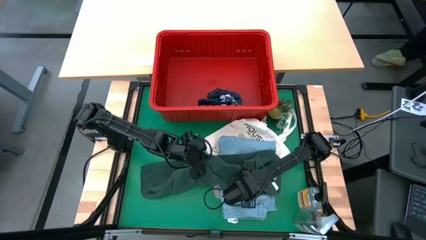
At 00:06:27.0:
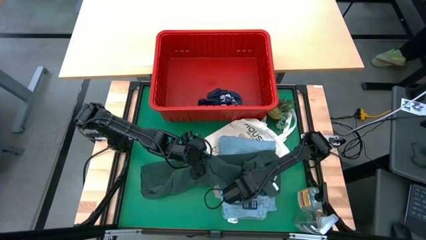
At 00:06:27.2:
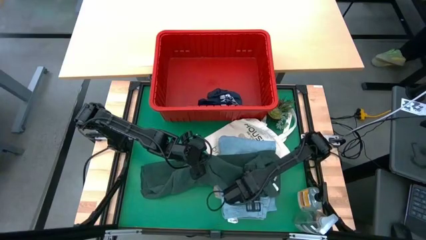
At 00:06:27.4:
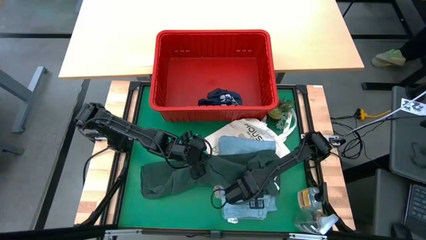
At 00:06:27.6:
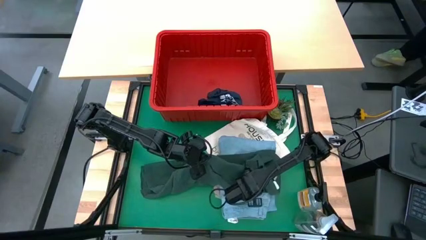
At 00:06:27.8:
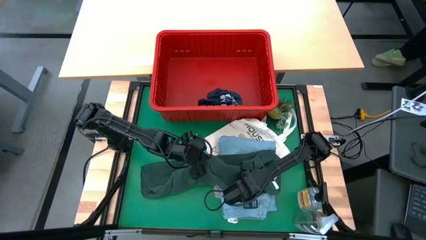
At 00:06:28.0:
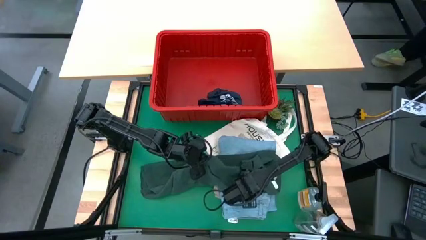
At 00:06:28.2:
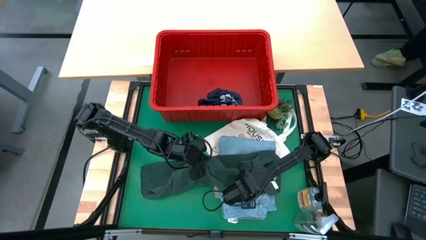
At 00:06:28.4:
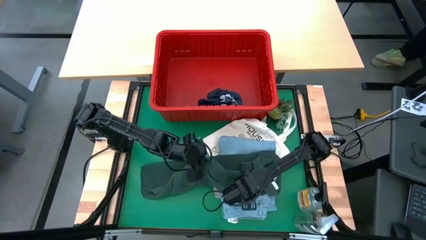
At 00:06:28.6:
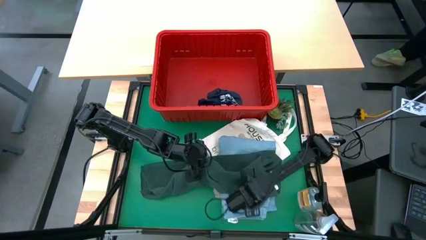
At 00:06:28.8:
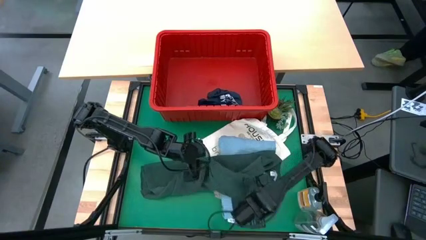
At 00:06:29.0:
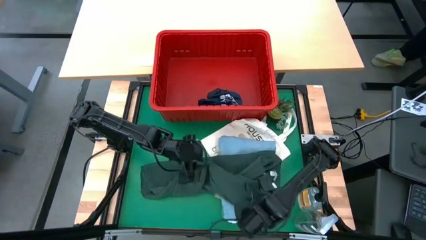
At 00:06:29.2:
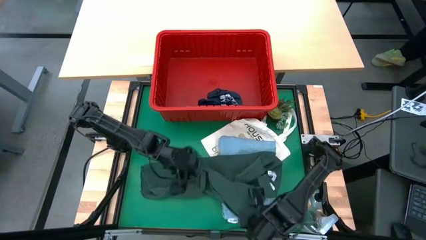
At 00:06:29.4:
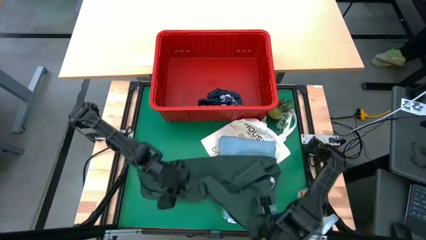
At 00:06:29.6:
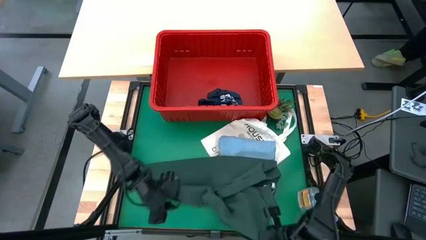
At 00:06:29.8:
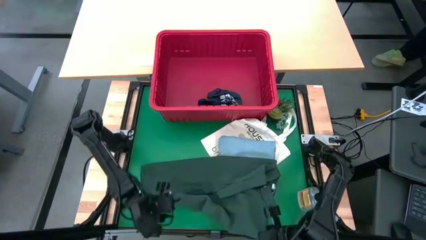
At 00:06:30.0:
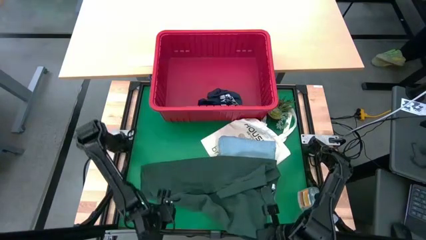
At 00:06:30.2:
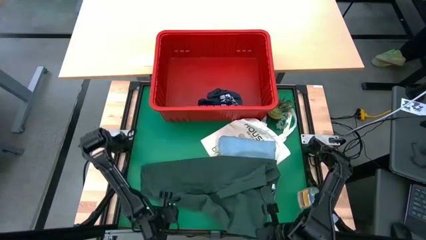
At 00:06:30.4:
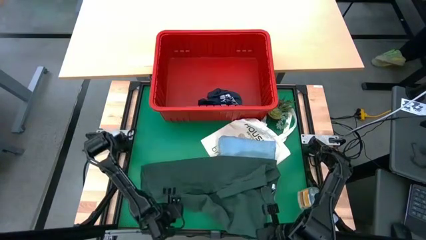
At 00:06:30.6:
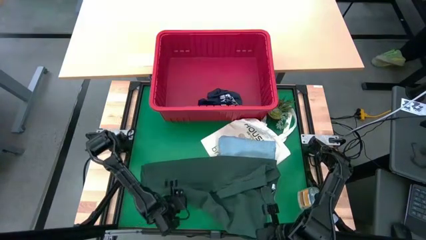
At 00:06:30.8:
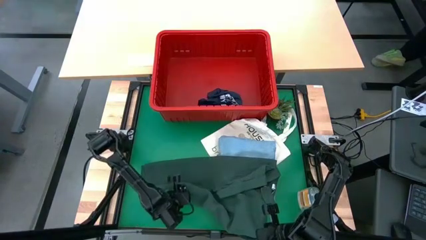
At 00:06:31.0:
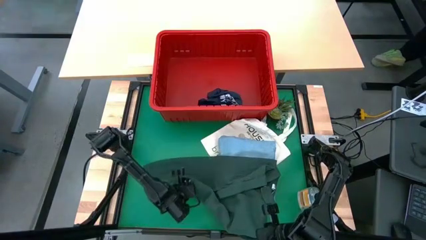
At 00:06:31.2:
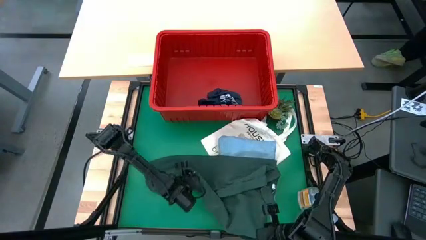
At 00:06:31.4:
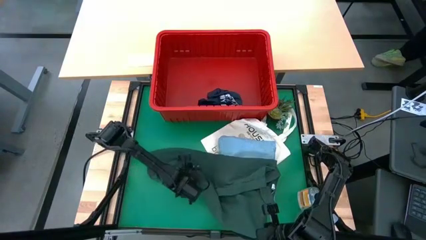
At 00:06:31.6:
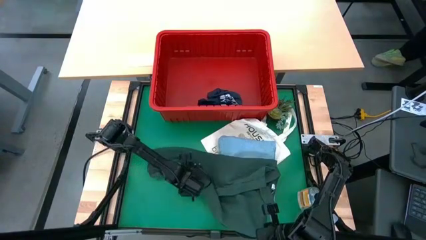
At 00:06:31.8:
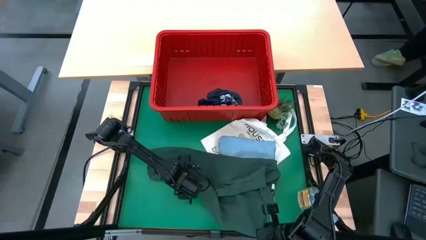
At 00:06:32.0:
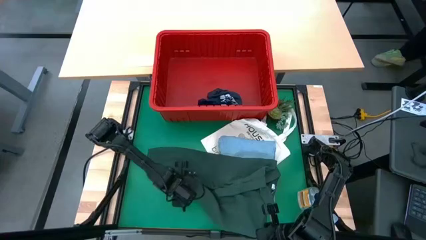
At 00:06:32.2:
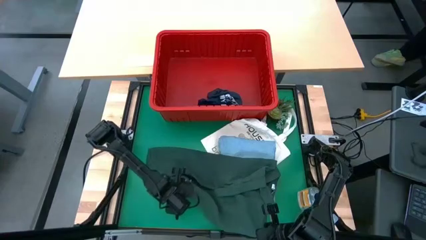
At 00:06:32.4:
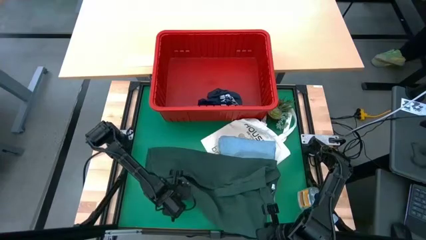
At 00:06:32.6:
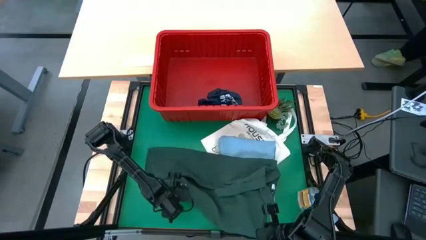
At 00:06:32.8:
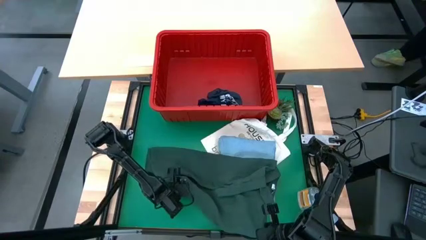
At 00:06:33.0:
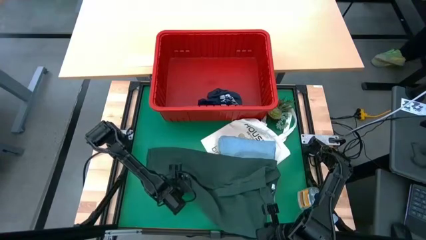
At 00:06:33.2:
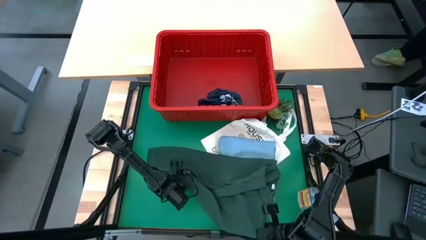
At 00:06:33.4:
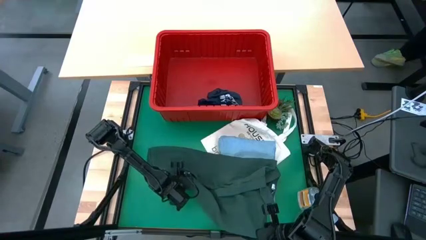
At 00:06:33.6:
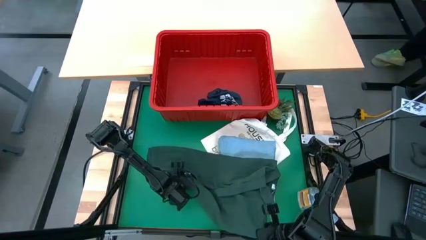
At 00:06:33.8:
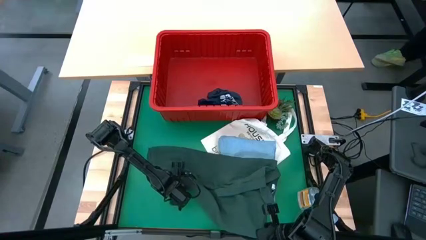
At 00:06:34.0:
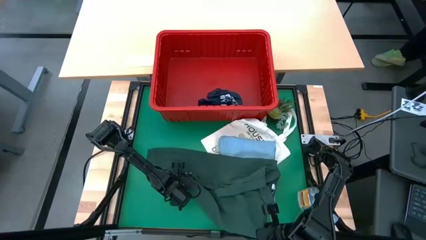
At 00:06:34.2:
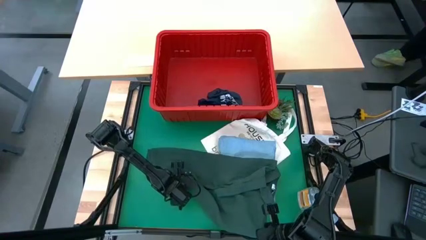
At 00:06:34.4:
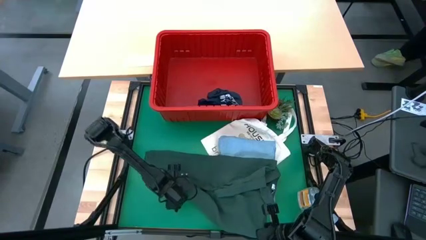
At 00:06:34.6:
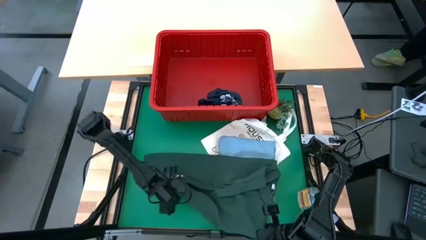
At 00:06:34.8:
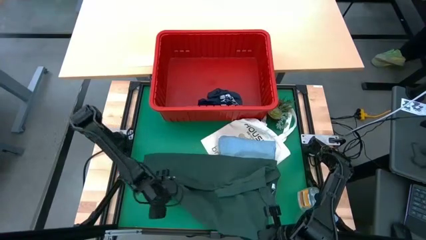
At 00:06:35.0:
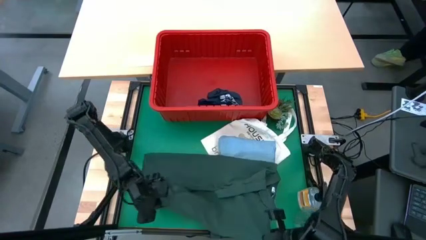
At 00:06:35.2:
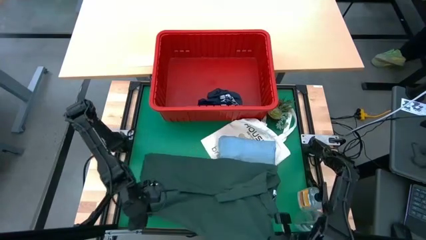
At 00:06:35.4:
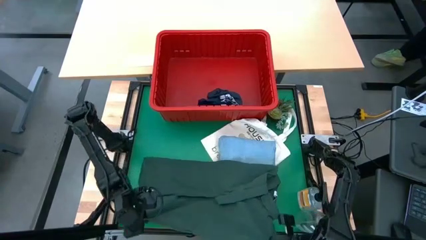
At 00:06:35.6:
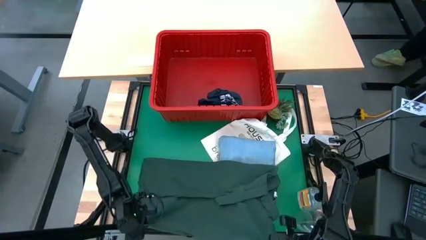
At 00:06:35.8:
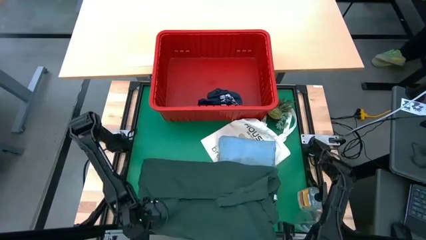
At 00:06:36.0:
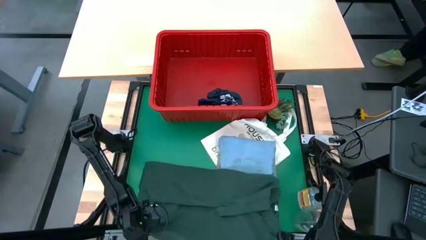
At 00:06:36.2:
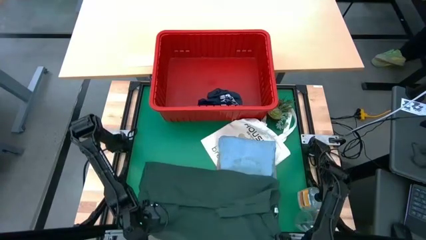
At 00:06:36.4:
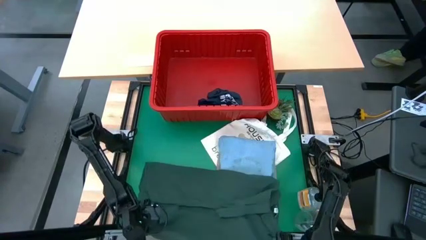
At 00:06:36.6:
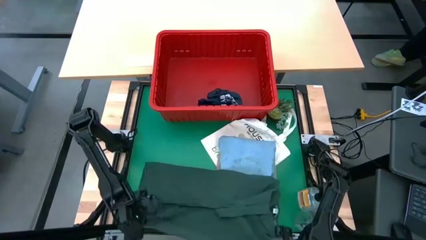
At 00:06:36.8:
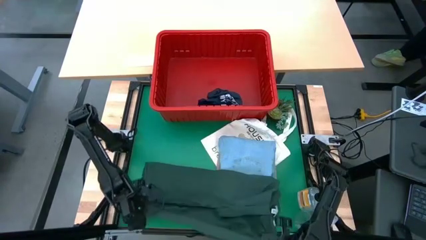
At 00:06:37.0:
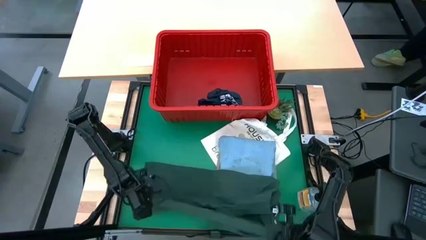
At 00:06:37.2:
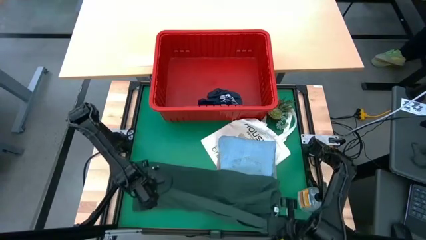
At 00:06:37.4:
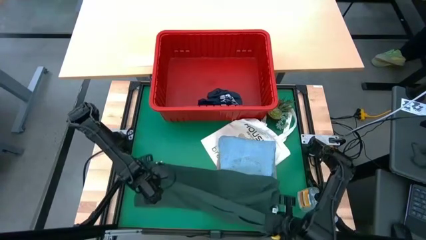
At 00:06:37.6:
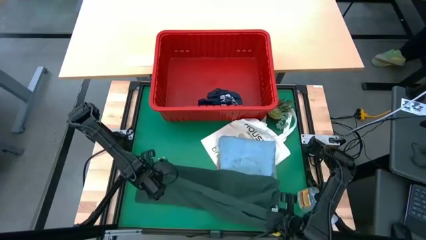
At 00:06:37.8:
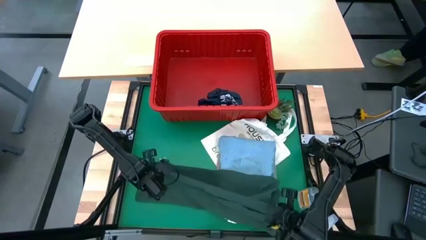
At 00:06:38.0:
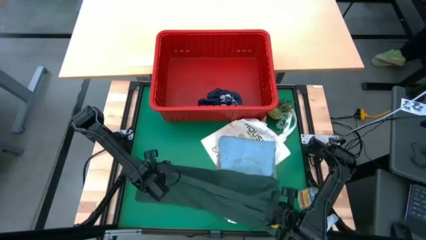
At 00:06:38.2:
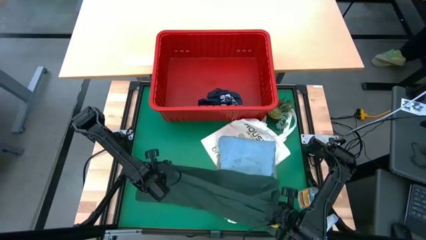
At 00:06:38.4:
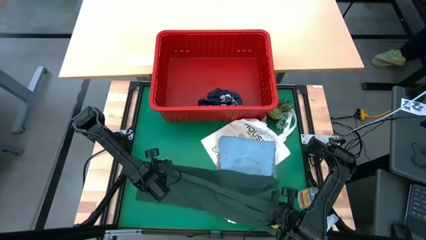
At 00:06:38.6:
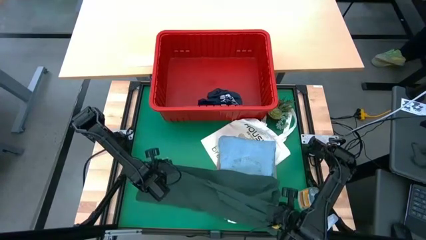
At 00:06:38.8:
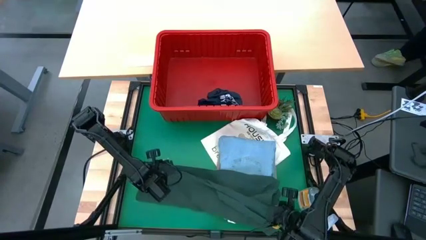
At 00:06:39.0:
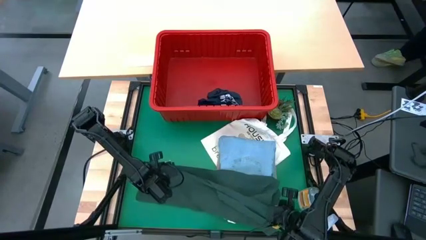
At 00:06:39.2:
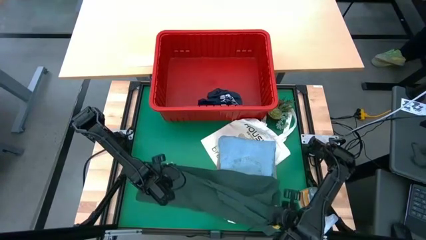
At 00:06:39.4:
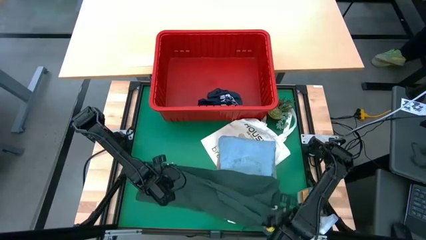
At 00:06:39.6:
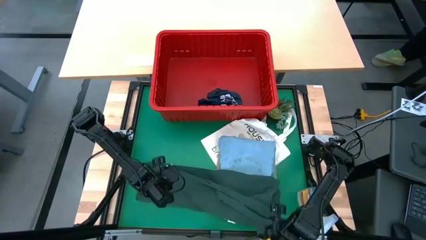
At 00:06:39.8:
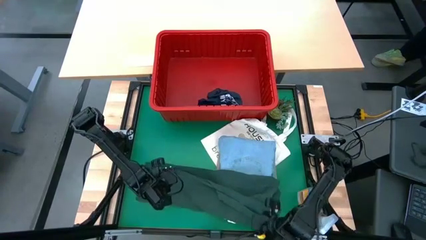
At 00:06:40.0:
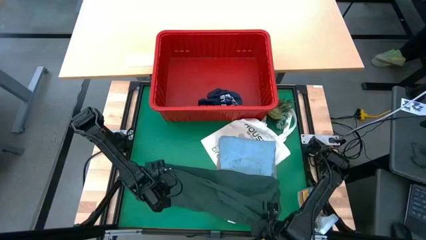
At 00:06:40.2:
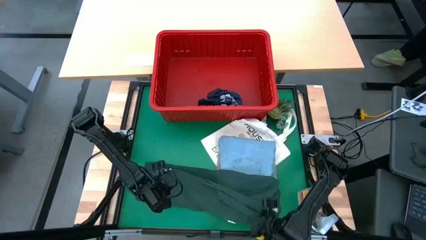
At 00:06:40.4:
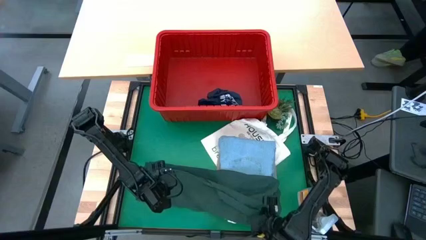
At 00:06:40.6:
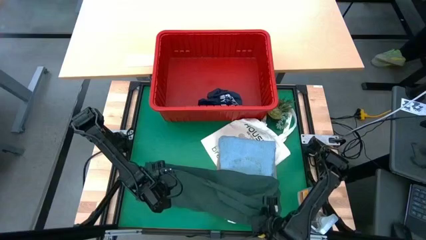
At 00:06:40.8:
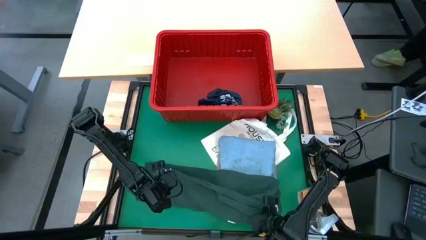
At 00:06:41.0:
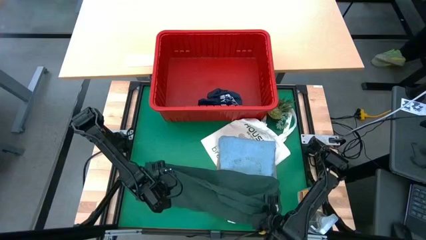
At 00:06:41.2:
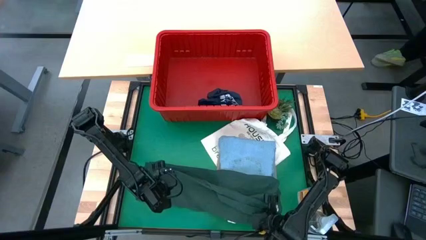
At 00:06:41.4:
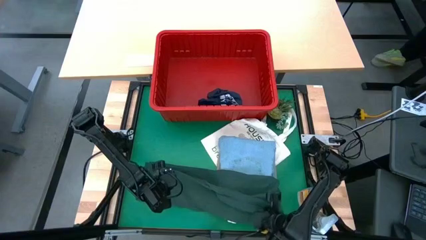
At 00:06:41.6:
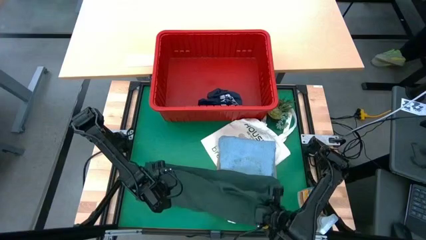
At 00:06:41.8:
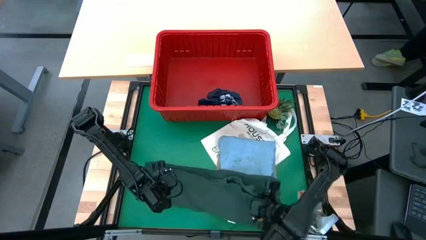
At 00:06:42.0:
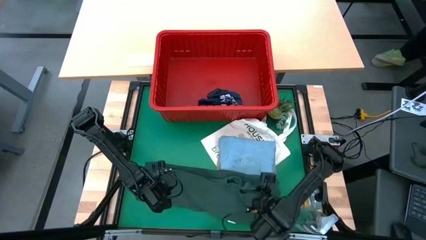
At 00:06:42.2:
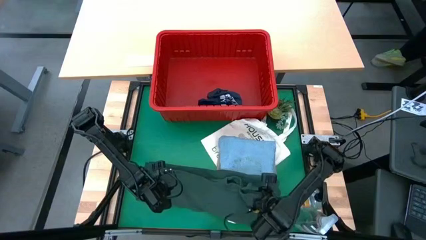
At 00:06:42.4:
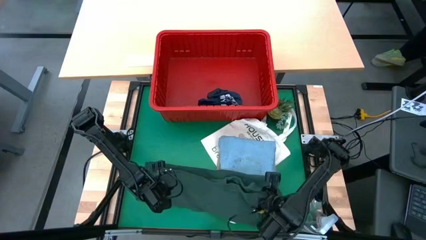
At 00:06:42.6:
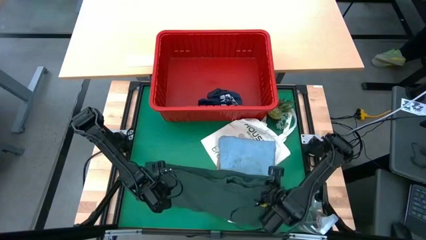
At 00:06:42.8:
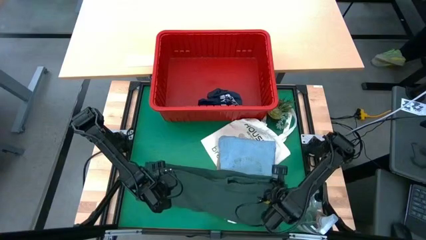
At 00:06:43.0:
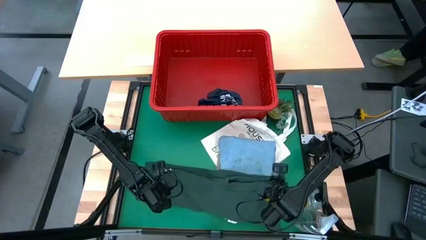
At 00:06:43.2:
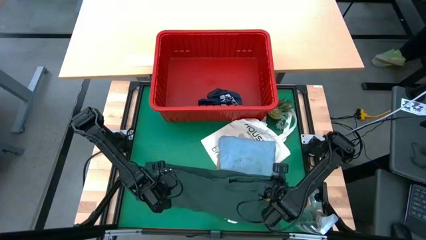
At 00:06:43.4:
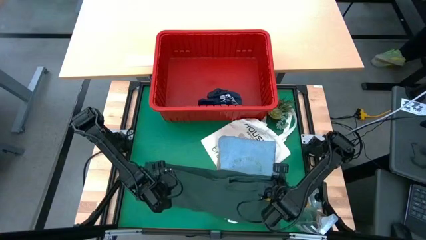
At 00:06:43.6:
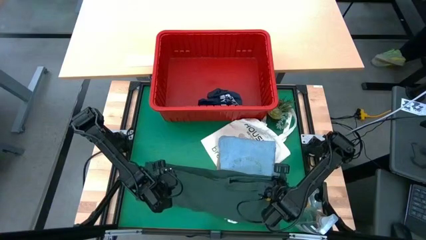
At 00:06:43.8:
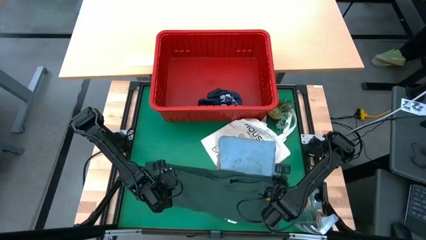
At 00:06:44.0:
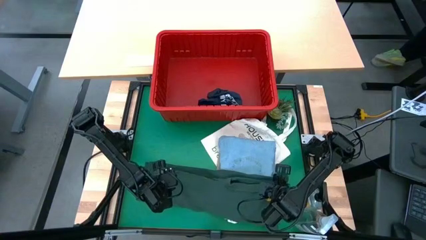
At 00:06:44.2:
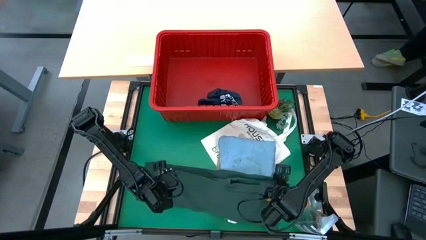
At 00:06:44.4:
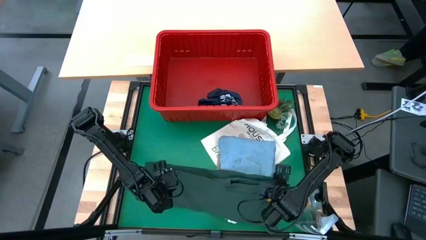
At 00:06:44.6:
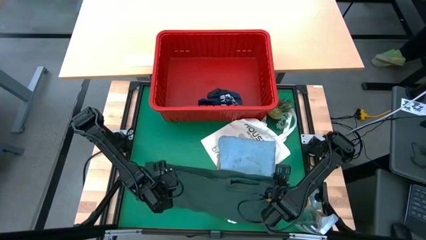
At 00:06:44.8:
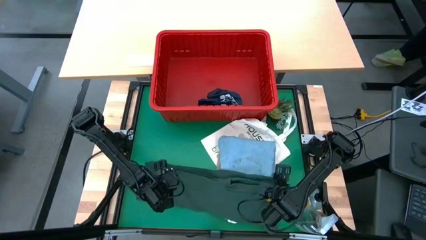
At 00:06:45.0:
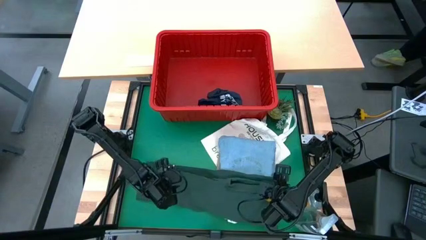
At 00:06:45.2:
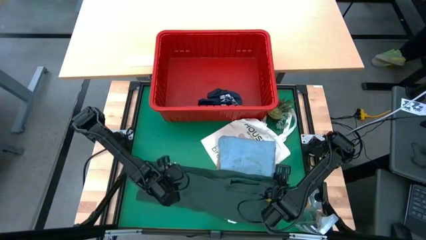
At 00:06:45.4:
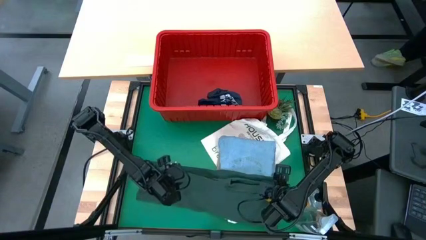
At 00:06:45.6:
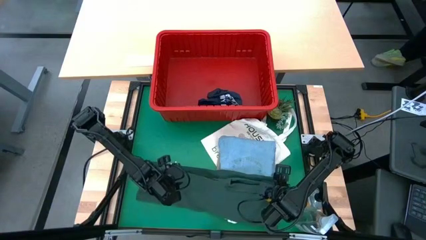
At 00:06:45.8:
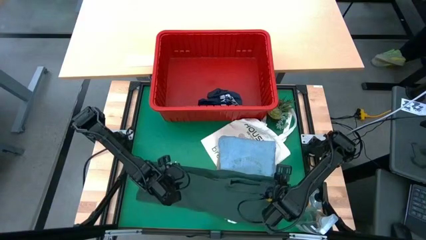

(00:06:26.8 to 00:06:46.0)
Task: Fold Laundry from Bin
Fold the green polo shirt
